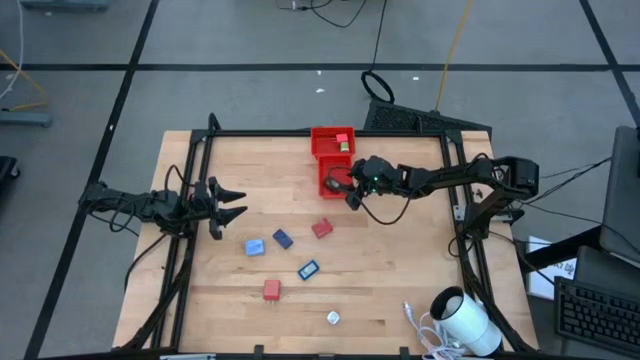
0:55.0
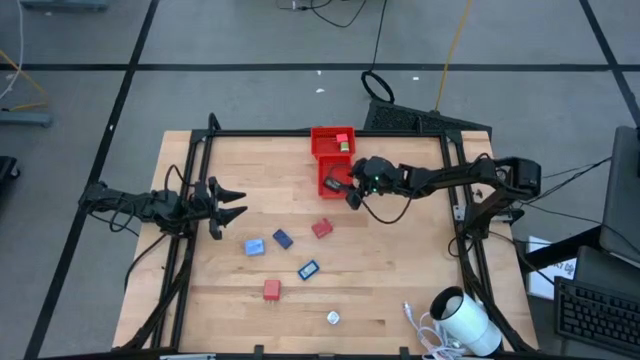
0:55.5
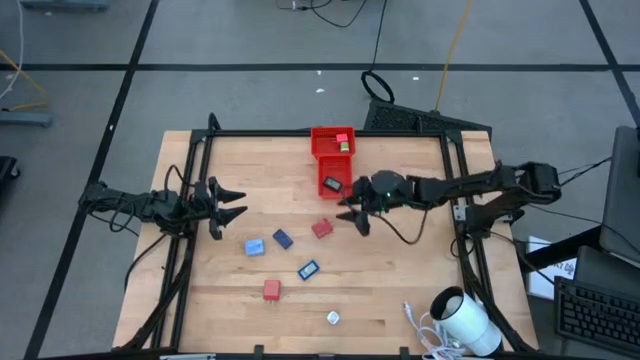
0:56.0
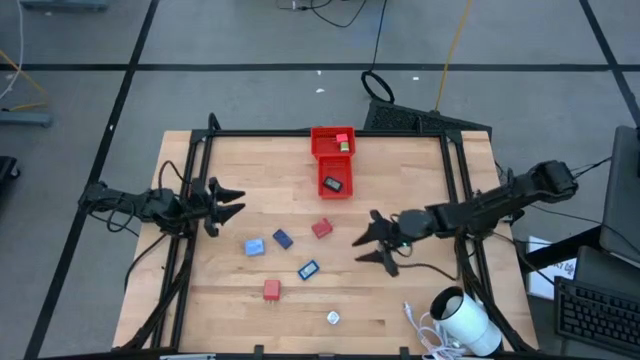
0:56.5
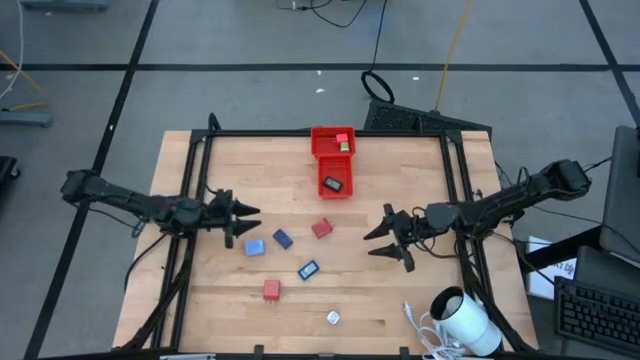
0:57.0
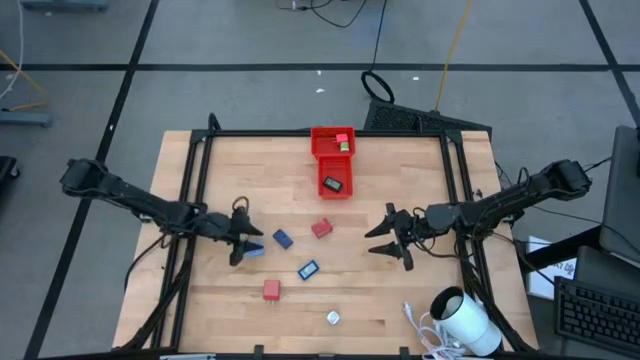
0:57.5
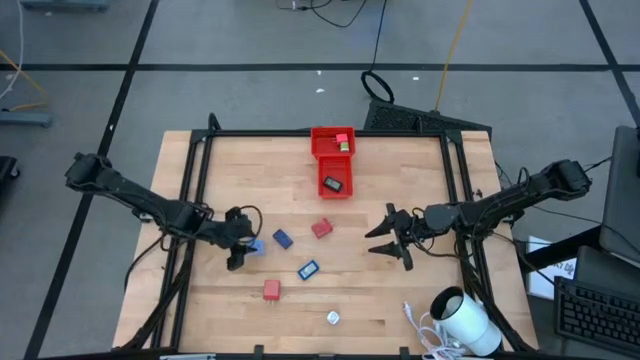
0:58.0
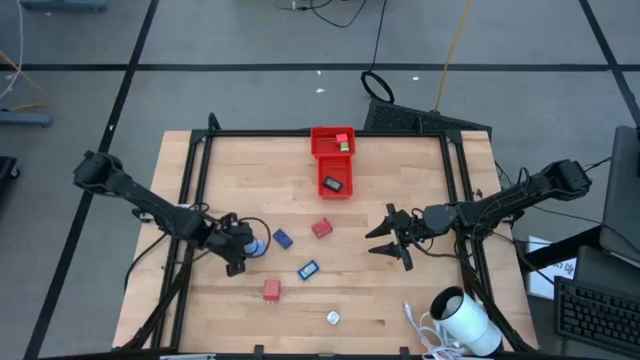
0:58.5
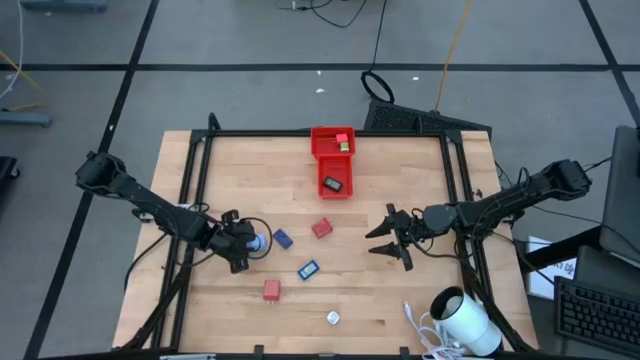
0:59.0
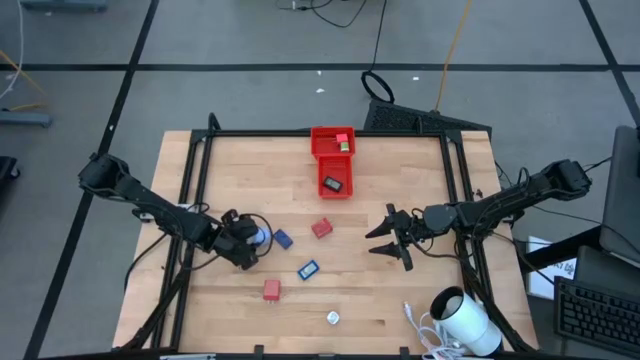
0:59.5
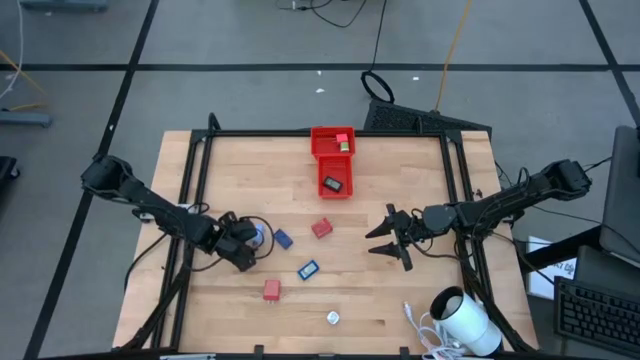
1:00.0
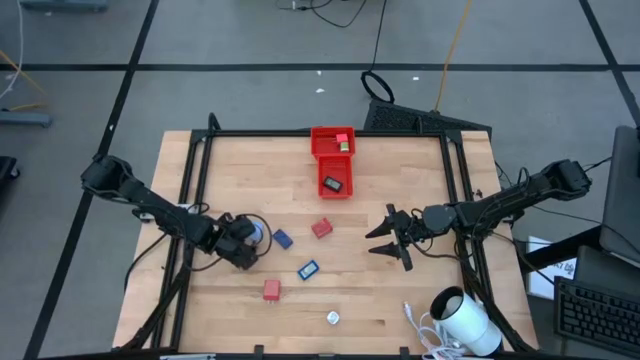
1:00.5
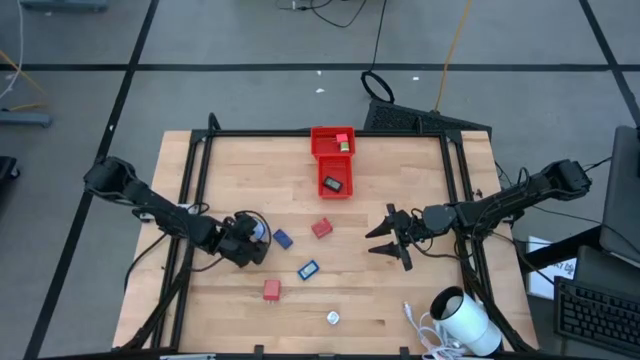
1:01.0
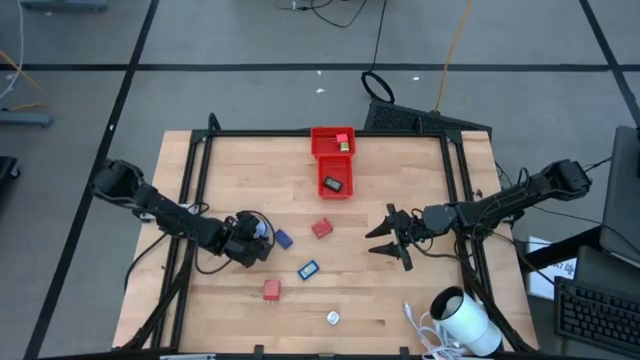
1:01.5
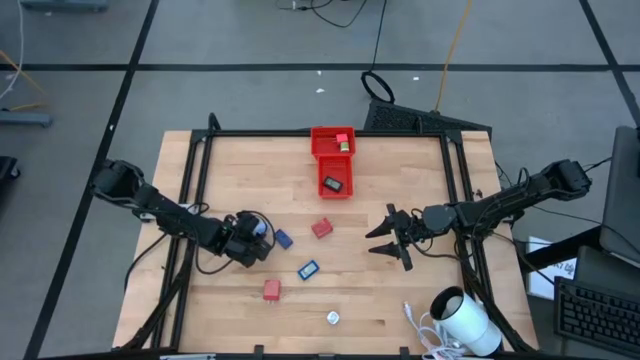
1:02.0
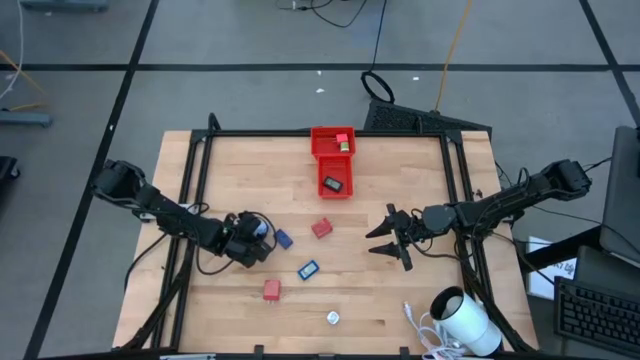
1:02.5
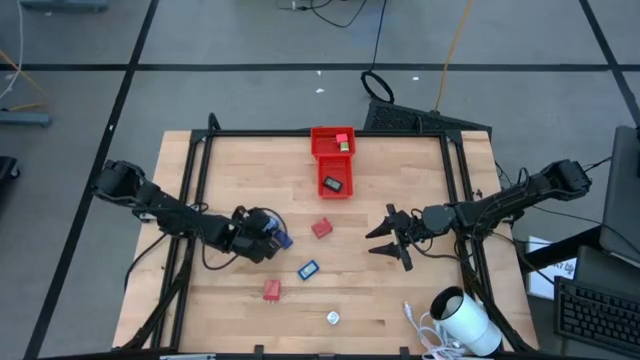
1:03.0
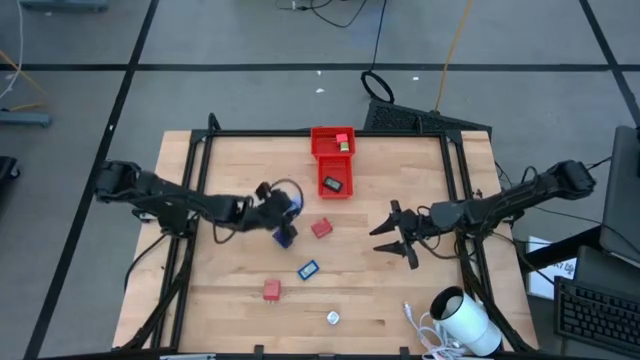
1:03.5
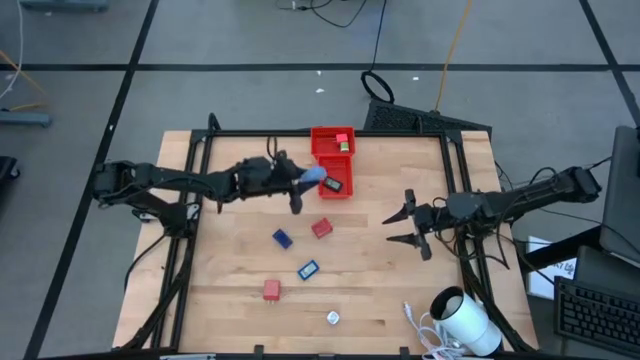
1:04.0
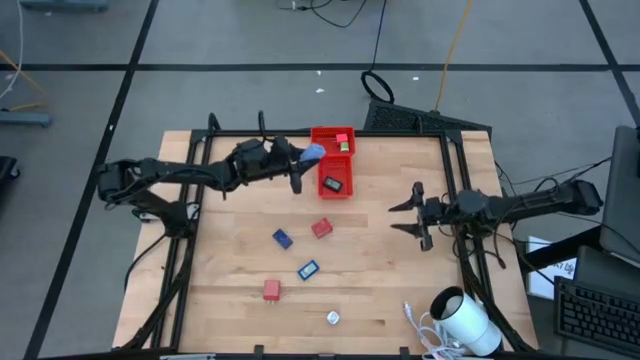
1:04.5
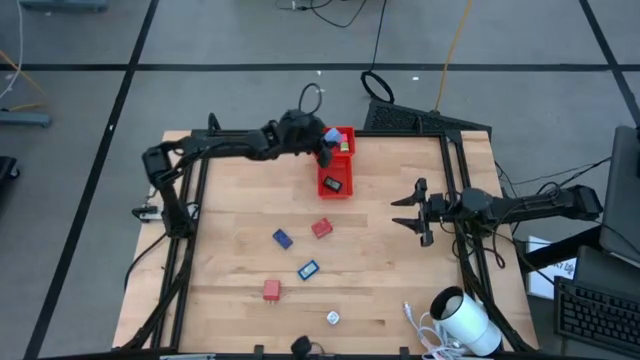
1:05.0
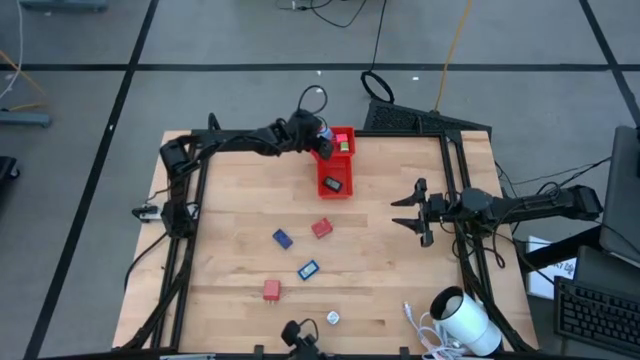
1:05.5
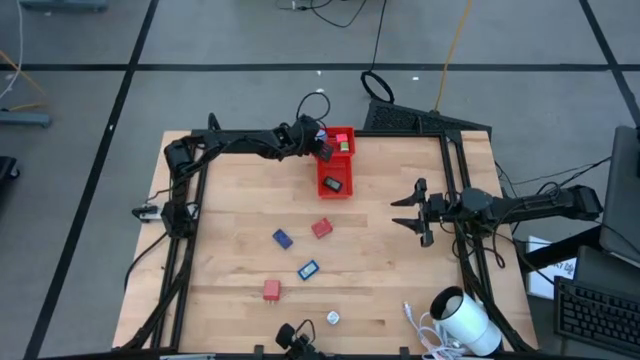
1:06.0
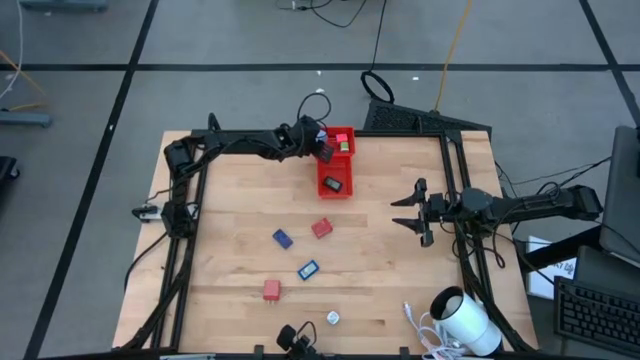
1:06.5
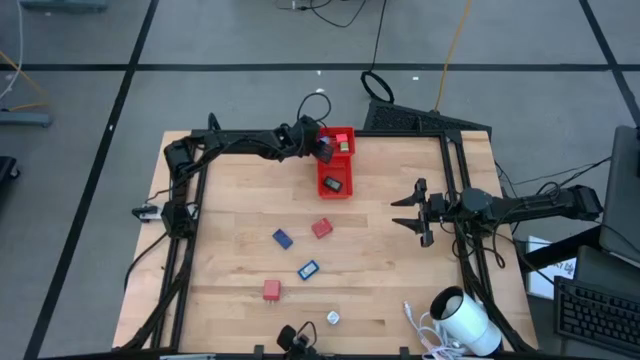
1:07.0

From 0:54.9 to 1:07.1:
Task: Pick & Place Office items
Put the blue charger adapter into the top red bin

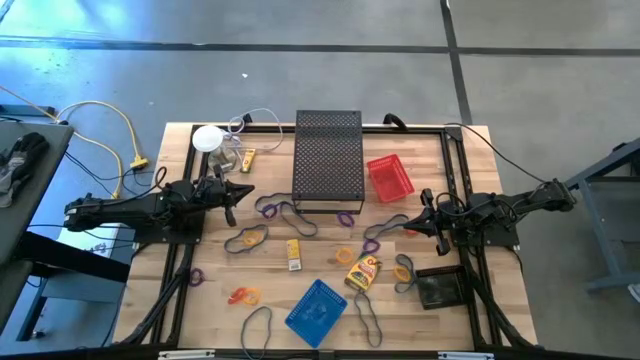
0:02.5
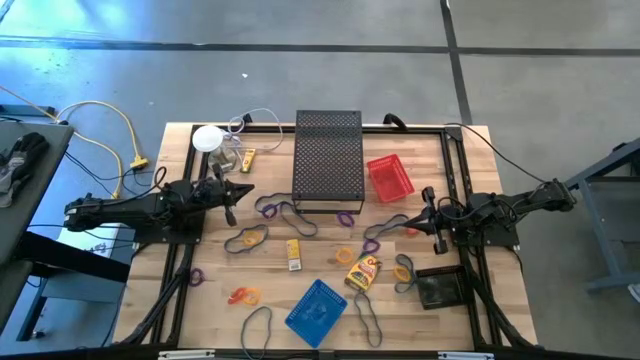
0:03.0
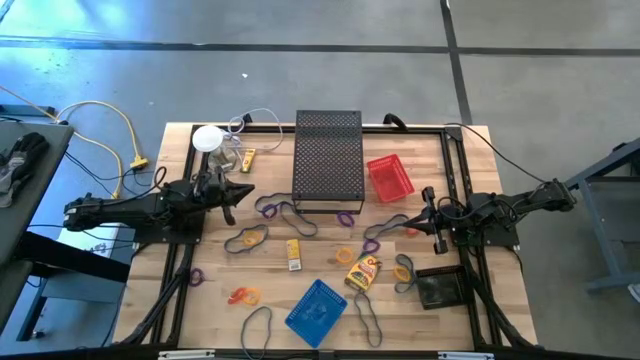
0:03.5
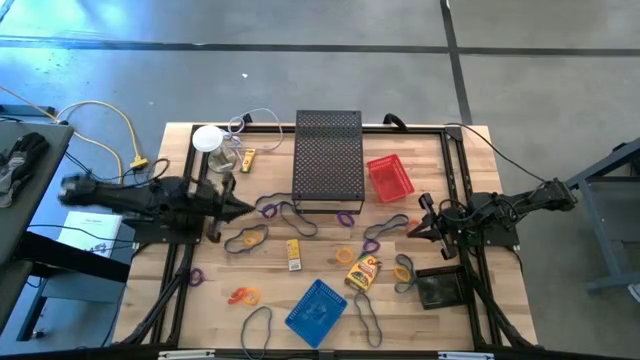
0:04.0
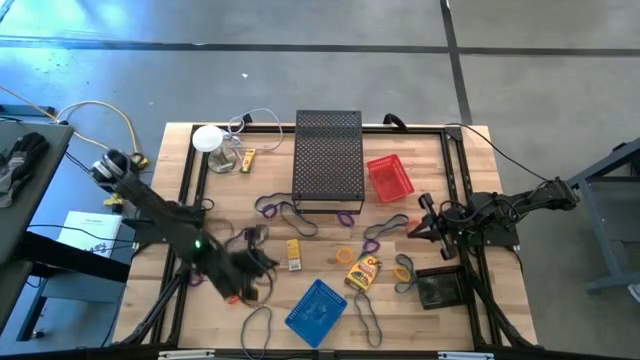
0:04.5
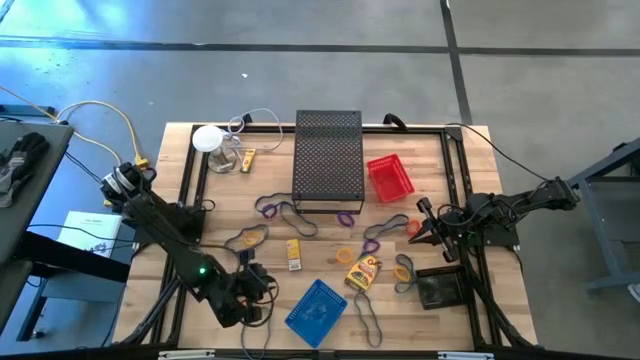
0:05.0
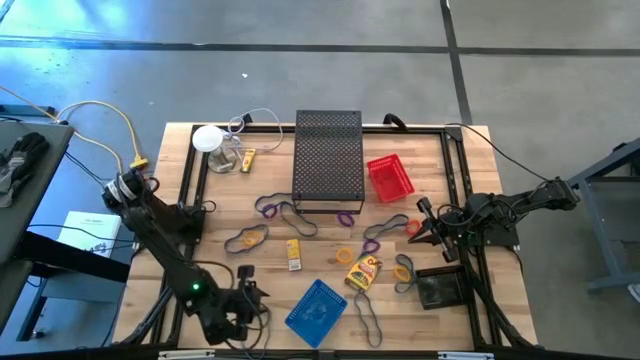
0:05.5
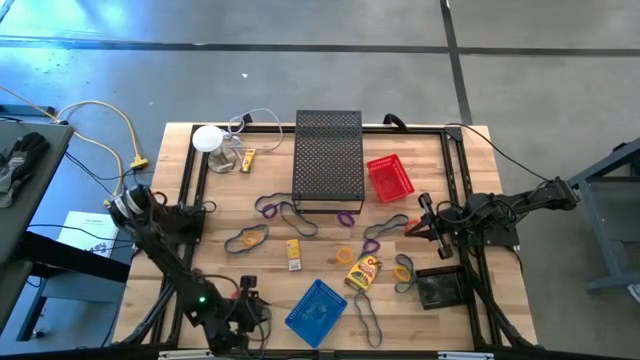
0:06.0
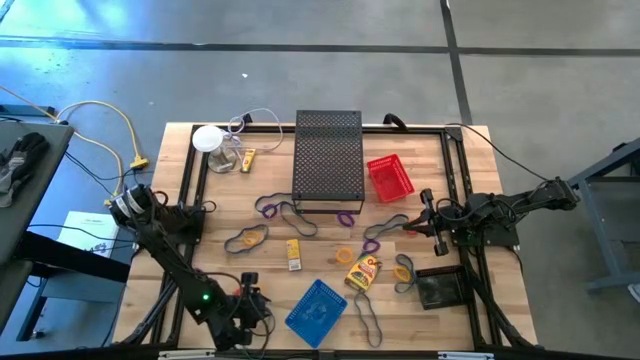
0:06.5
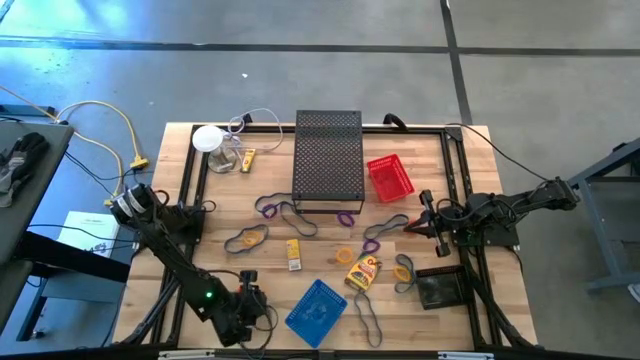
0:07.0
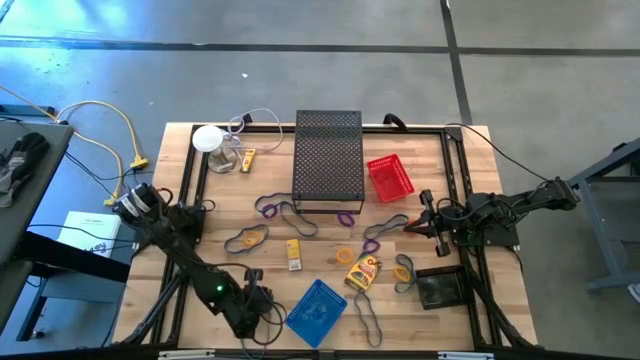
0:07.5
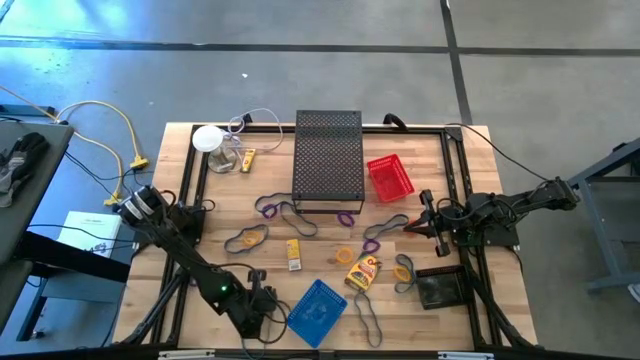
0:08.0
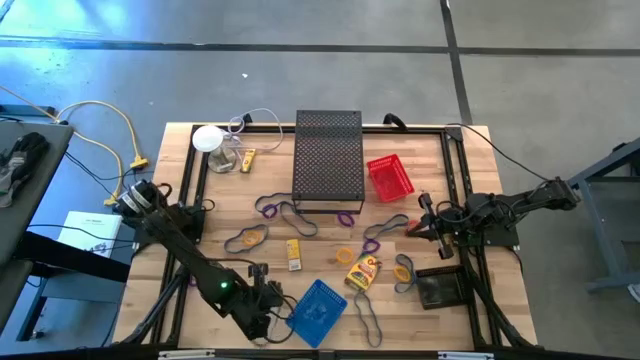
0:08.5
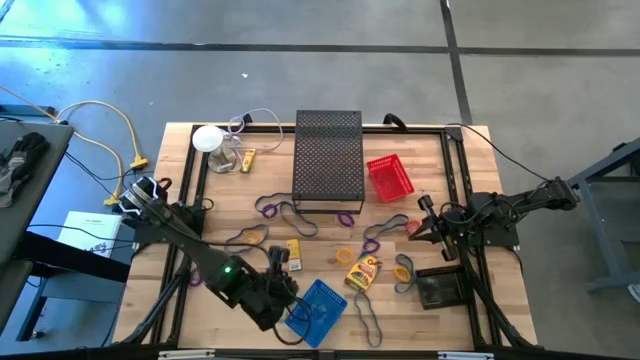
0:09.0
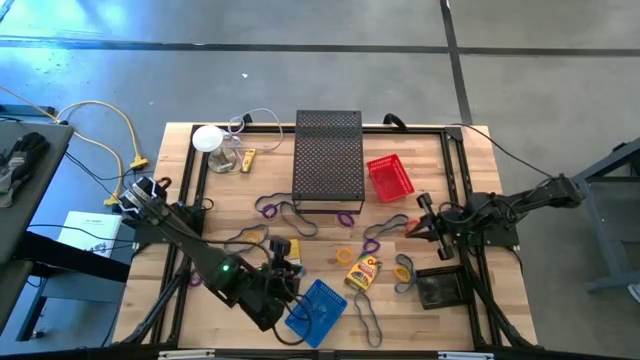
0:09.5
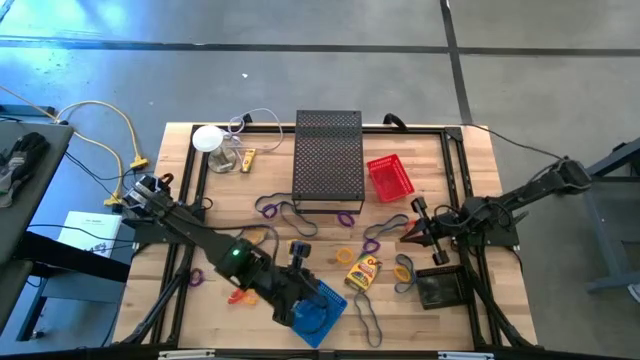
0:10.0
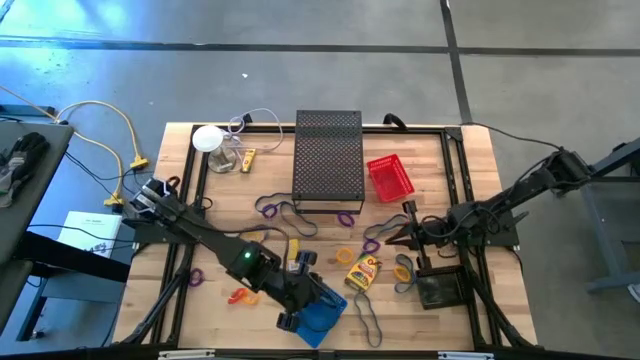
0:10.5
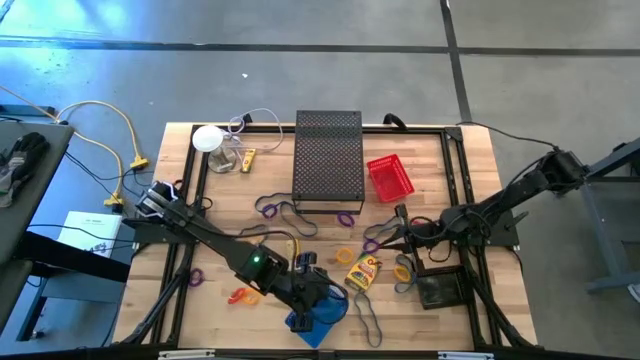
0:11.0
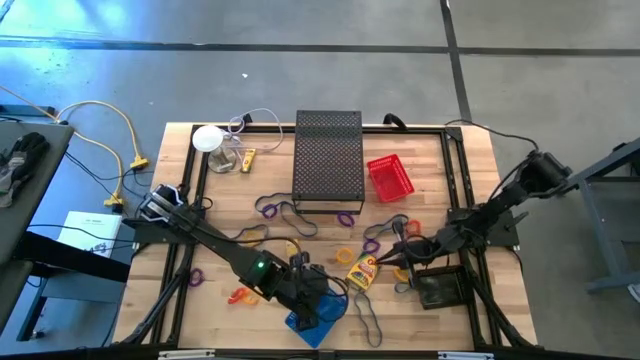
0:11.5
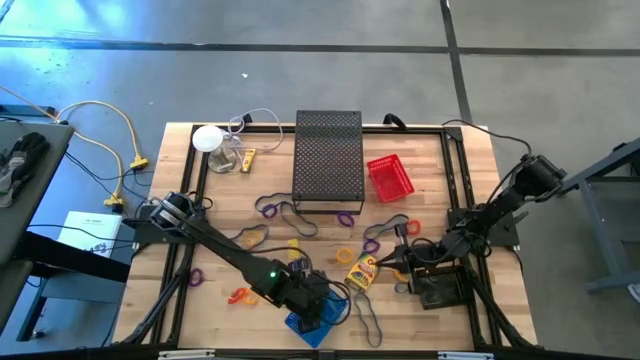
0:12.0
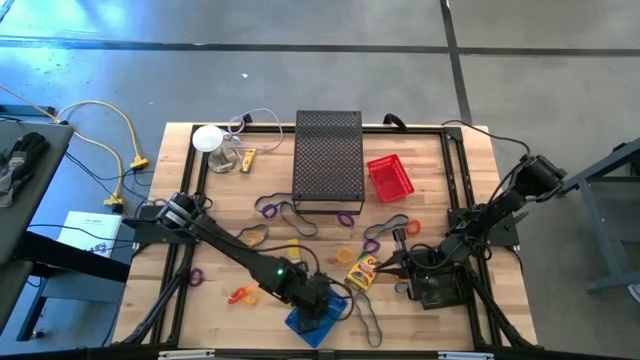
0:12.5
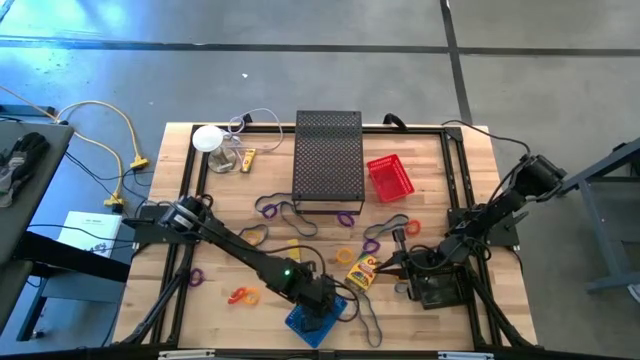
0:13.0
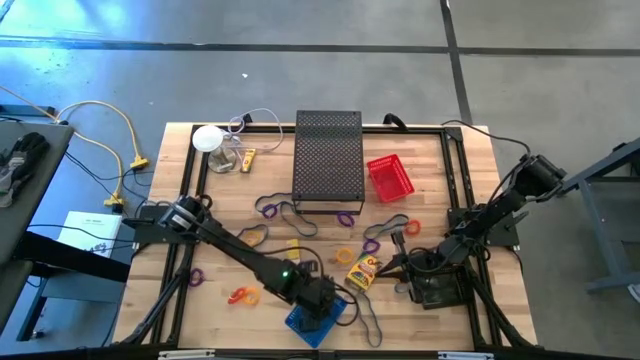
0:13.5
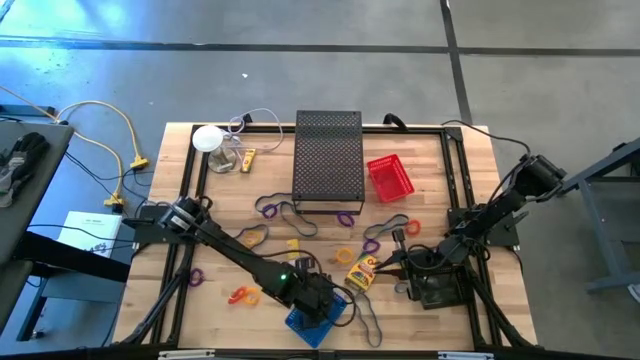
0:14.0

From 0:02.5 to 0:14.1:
Task: Pick & Place Office Desk Supplies
Put the blue rubber band into the blue bin
